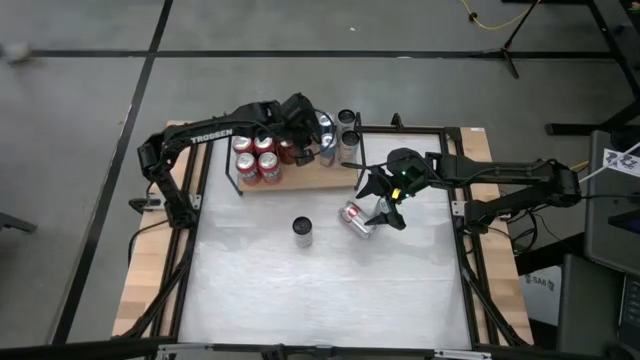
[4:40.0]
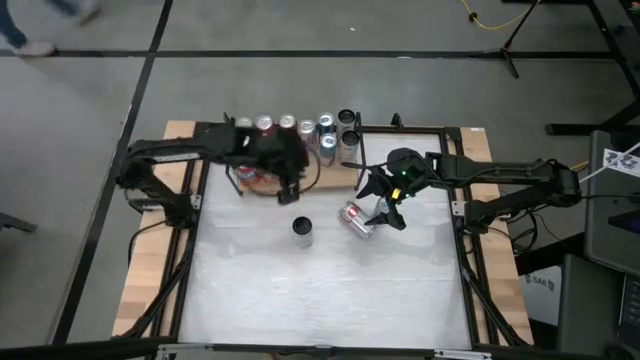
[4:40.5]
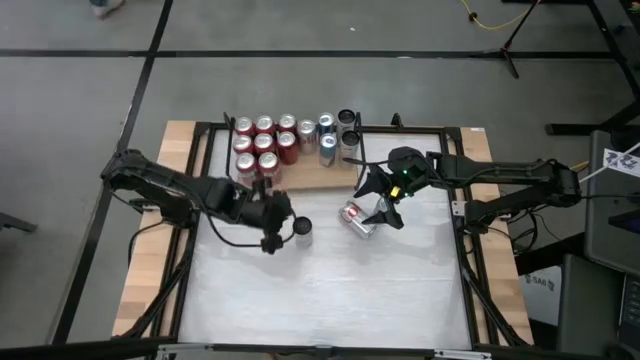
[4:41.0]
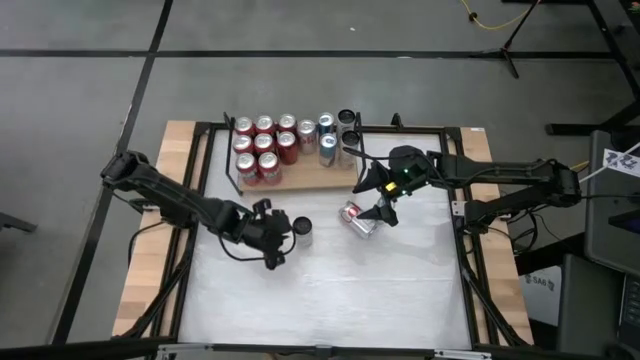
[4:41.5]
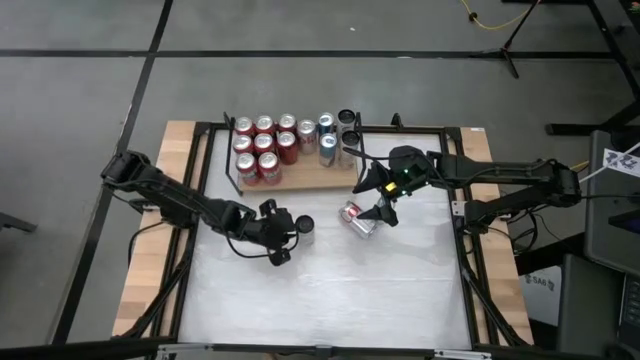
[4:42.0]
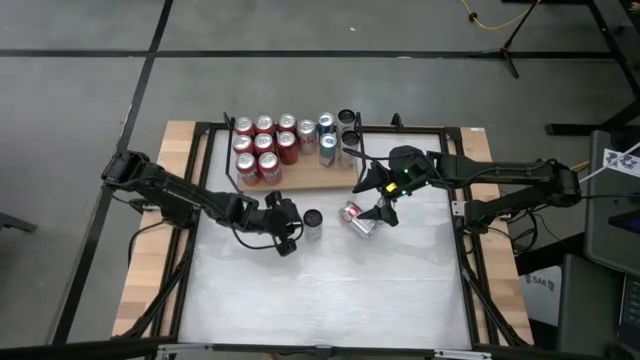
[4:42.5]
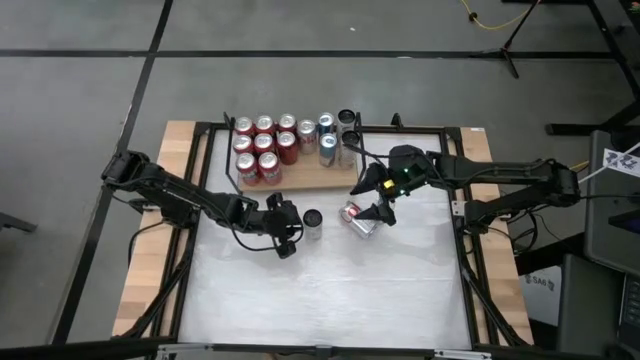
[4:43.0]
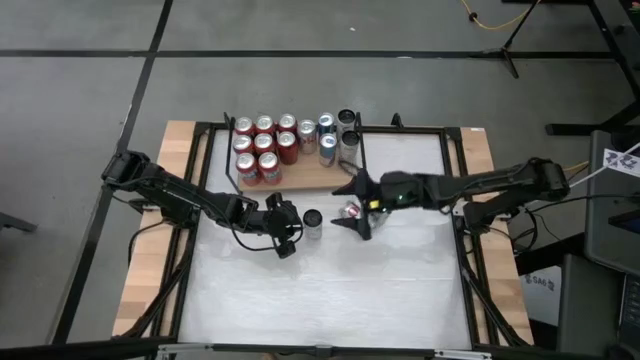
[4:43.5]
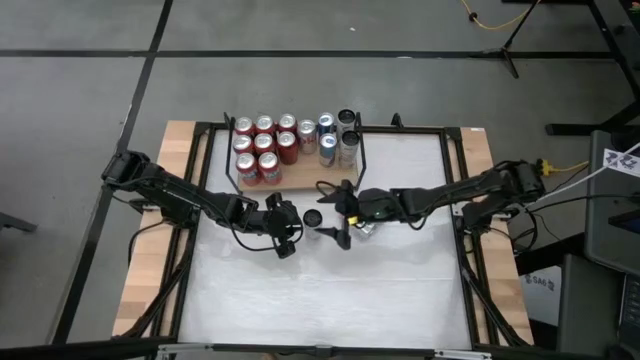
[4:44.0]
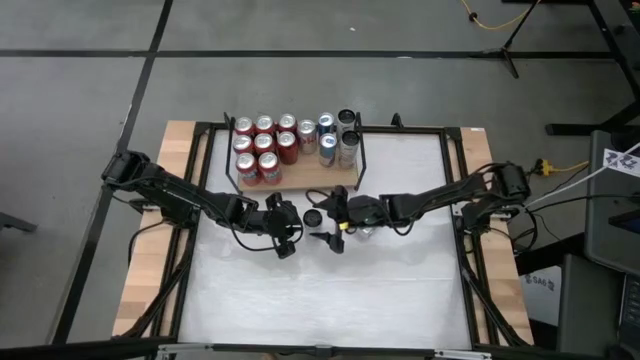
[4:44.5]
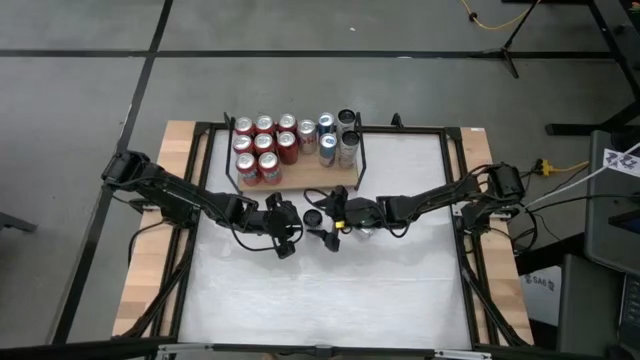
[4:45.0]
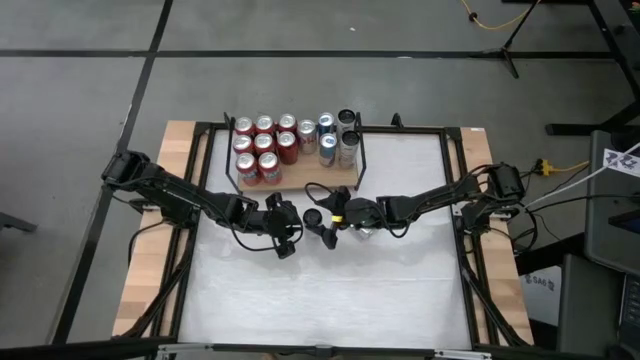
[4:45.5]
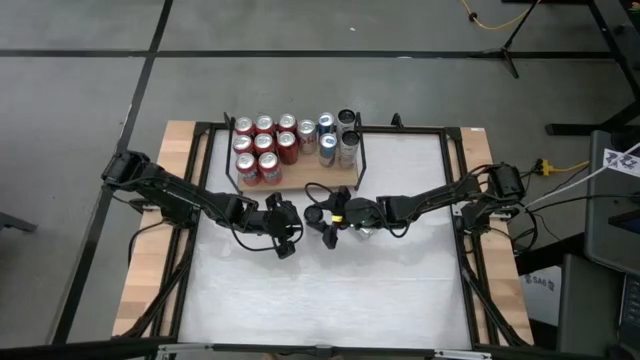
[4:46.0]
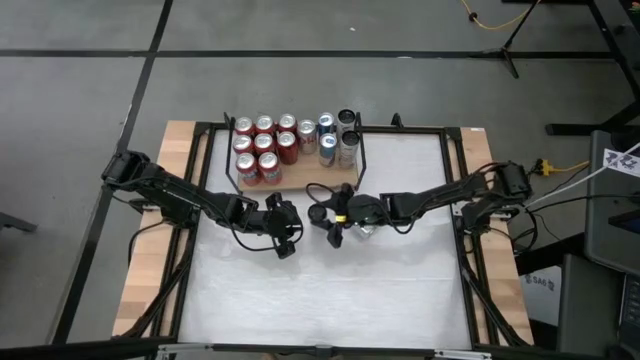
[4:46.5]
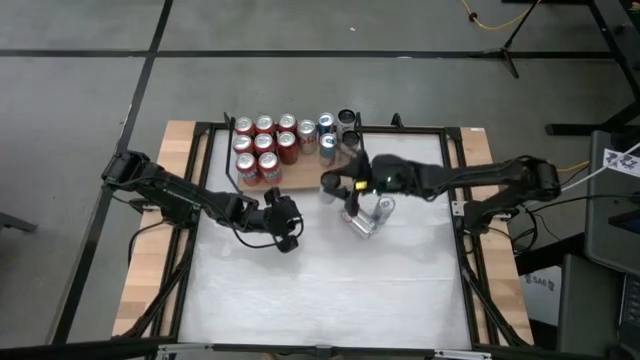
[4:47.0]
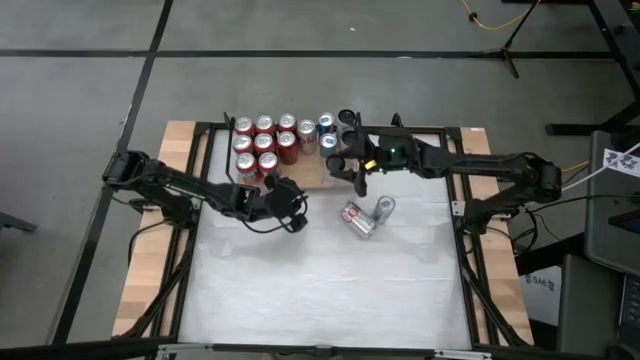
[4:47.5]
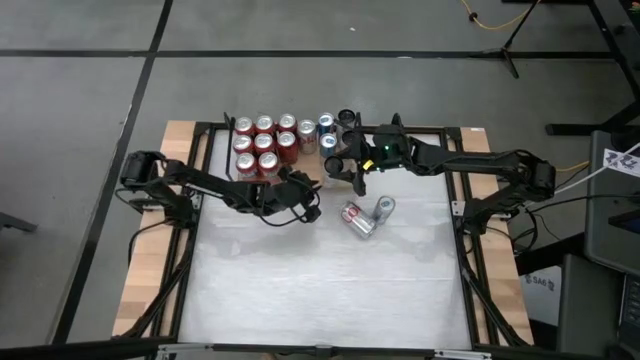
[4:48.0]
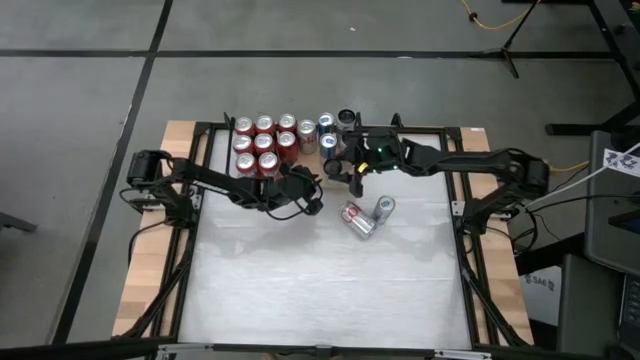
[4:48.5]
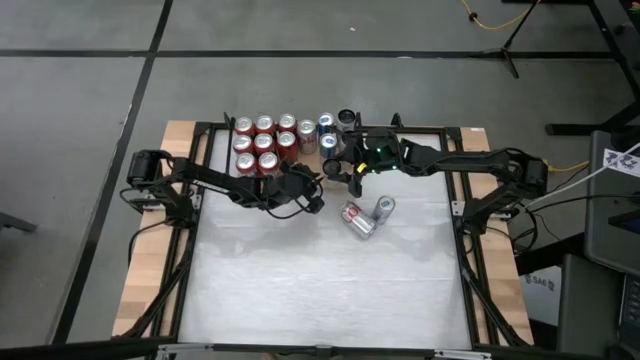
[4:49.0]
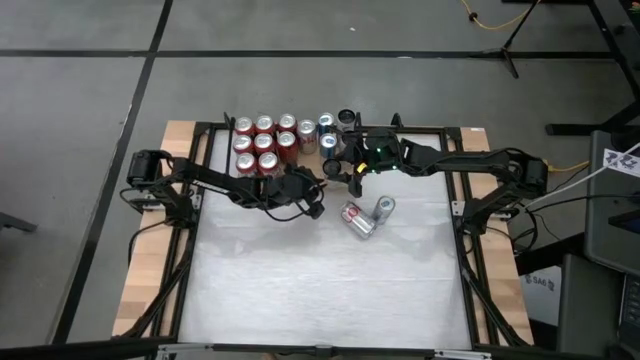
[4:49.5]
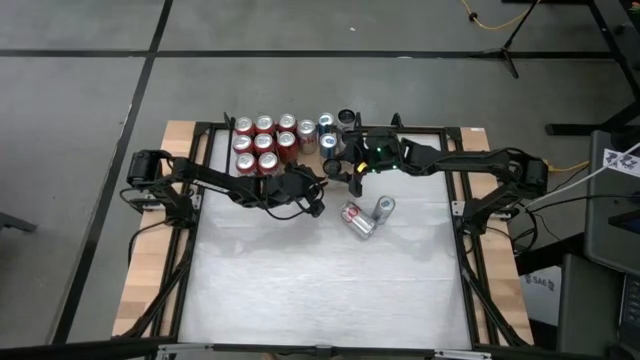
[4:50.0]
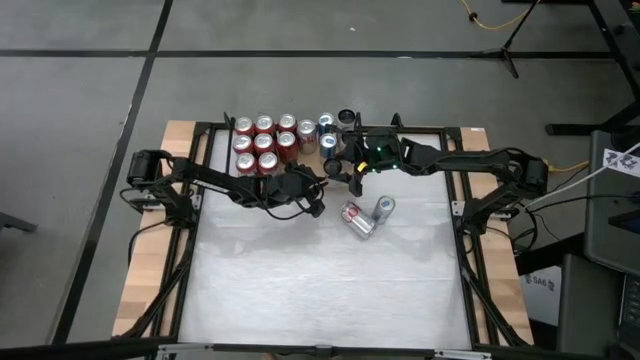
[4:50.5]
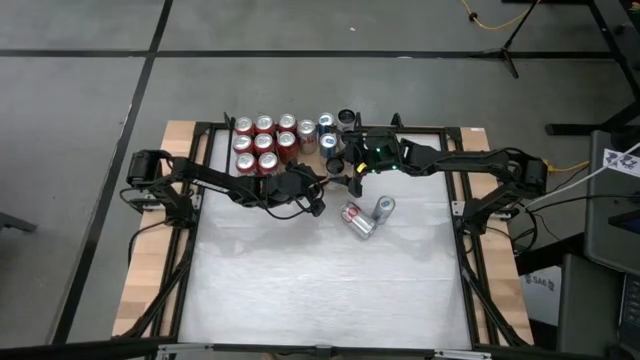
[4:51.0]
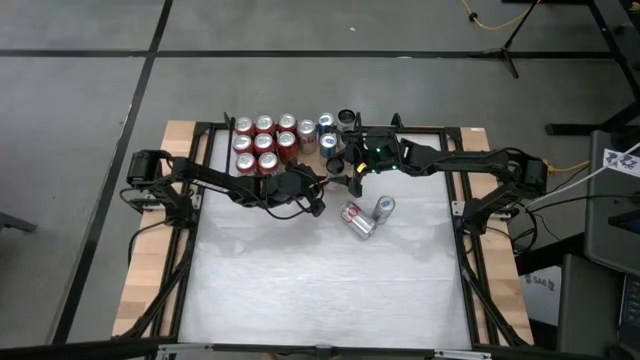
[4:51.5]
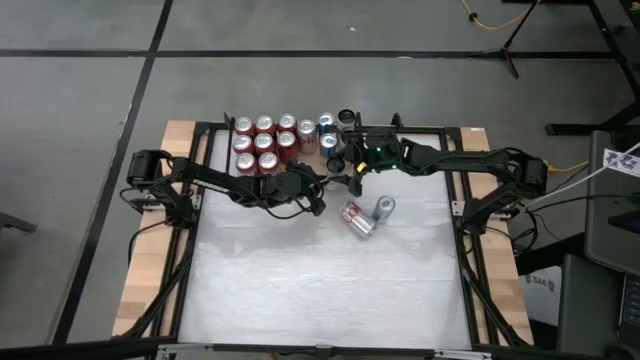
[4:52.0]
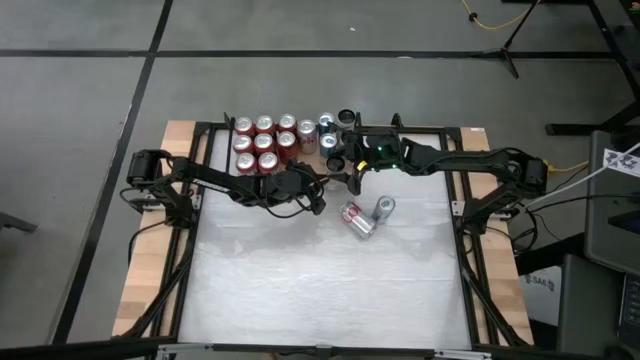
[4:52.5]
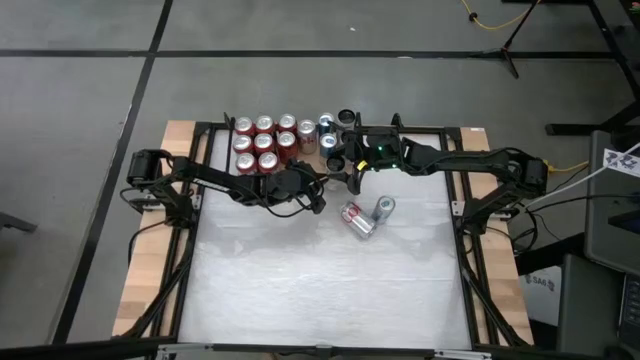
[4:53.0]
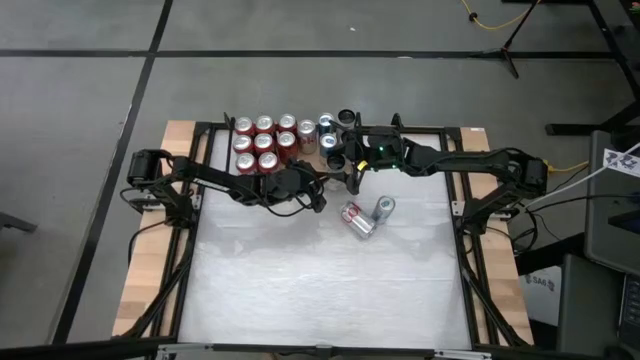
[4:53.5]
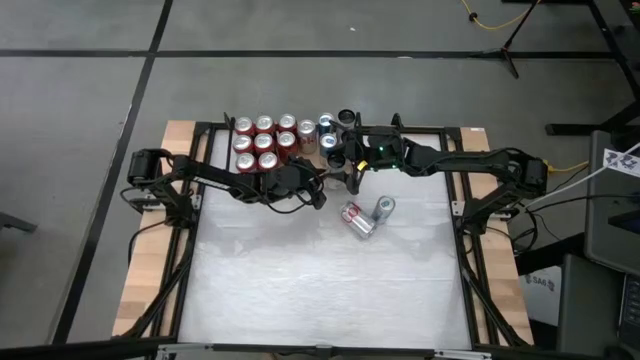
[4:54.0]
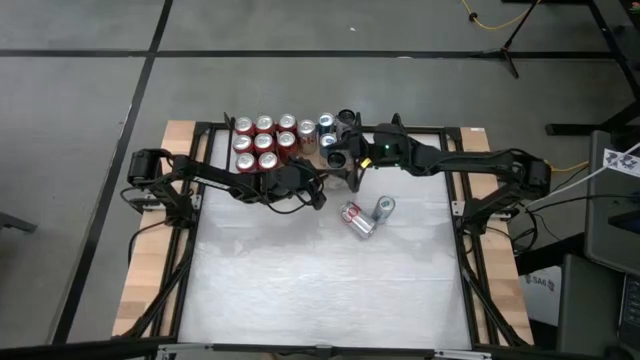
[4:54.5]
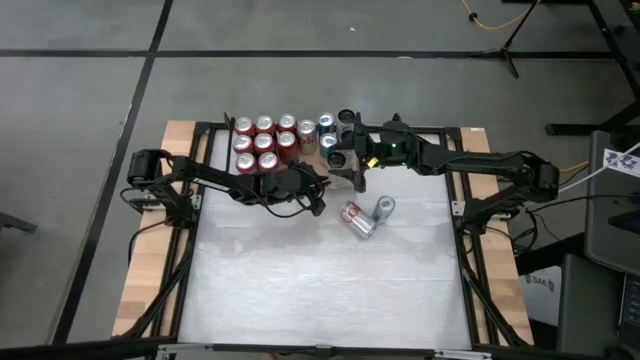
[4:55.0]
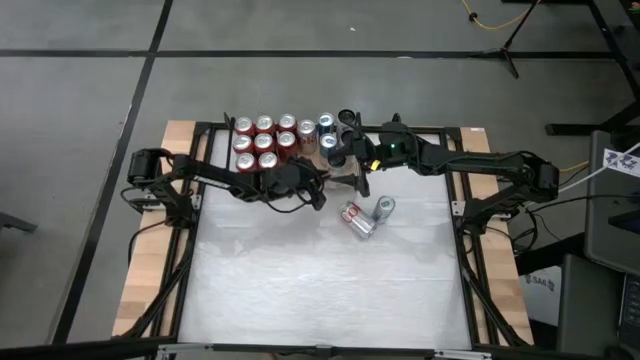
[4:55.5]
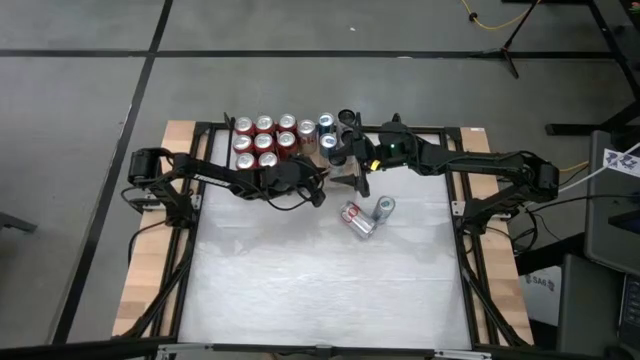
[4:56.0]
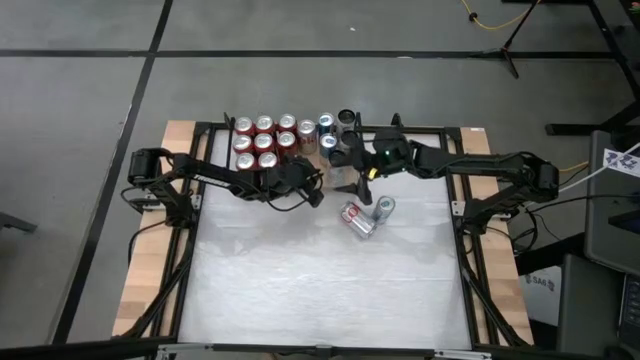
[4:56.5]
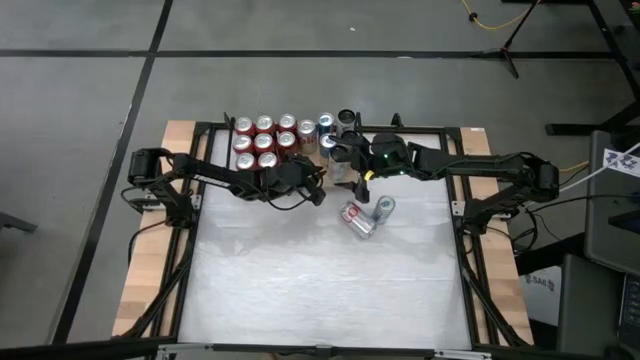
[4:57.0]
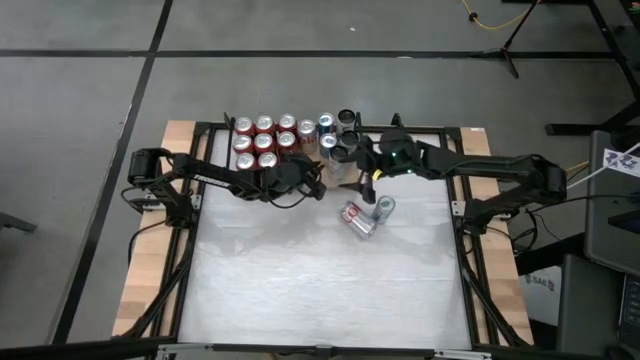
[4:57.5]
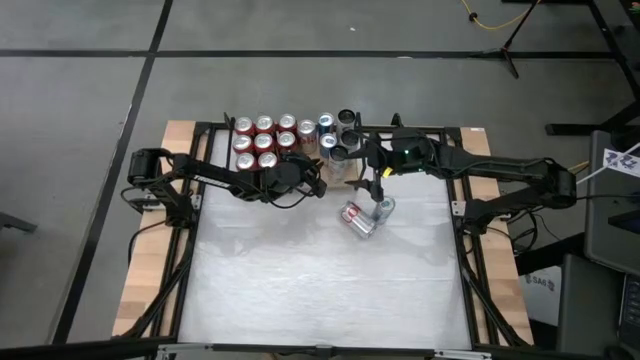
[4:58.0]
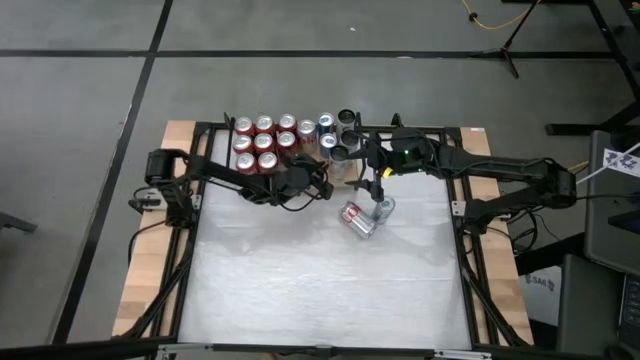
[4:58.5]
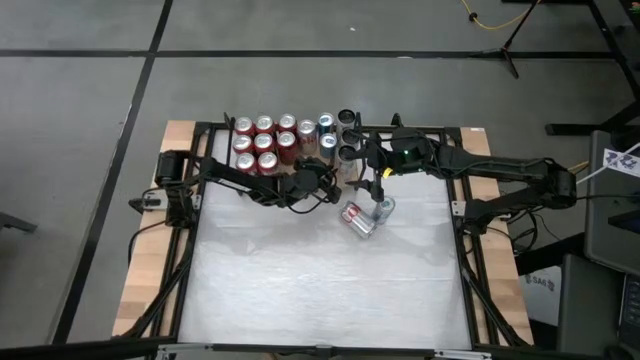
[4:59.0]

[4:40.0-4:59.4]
Task: Place canned beverage on shelf
Put the white pink soda can on the shelf aligned with the other white pink soda cans

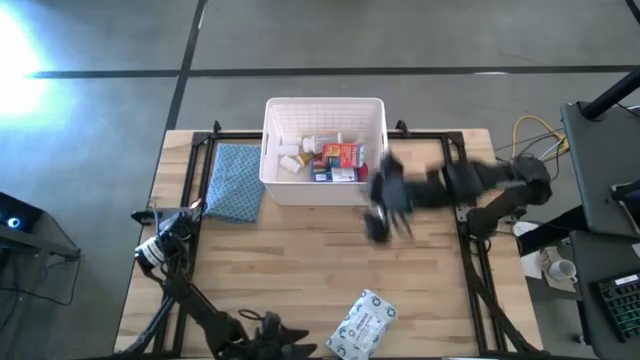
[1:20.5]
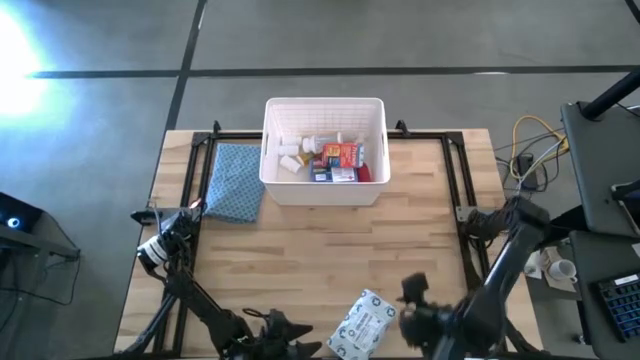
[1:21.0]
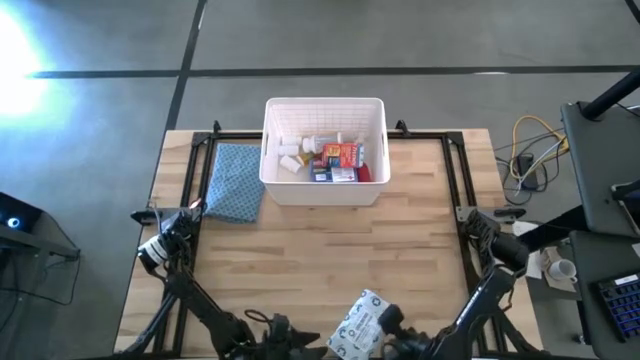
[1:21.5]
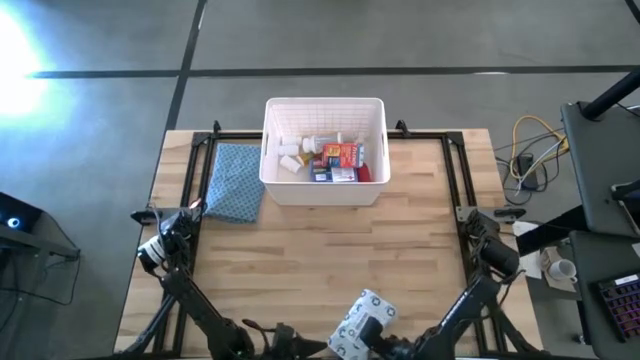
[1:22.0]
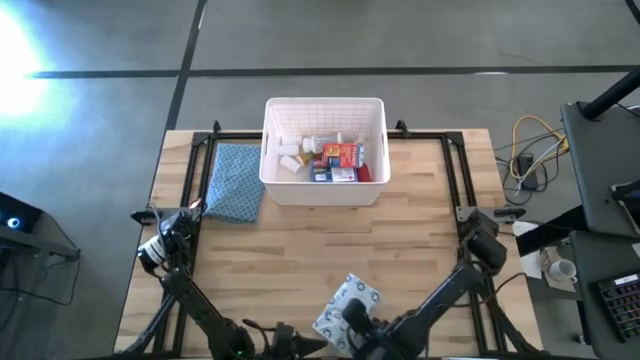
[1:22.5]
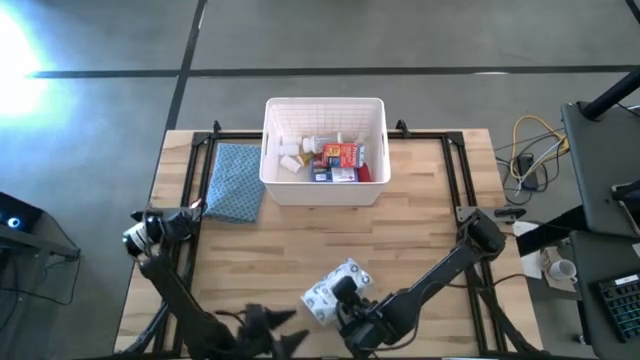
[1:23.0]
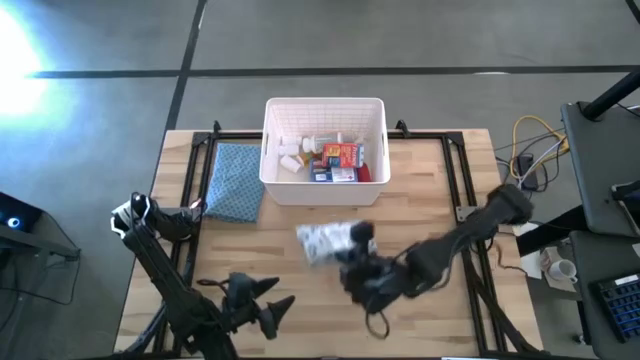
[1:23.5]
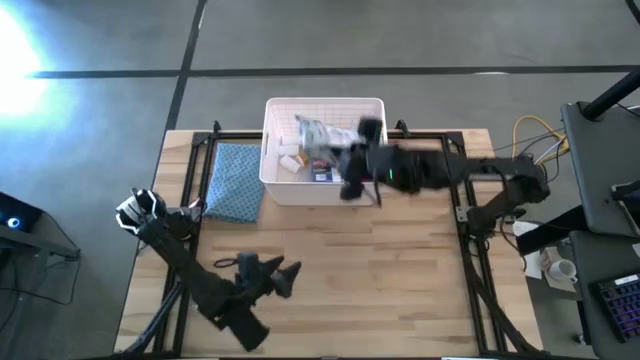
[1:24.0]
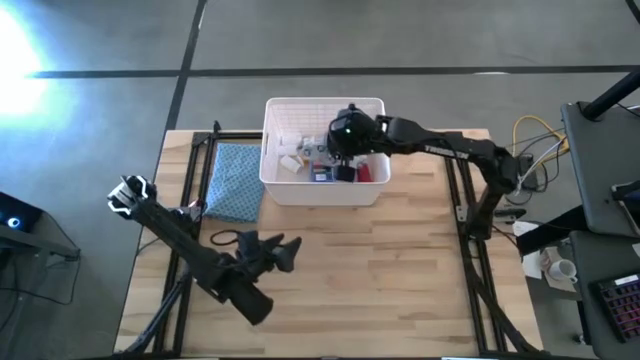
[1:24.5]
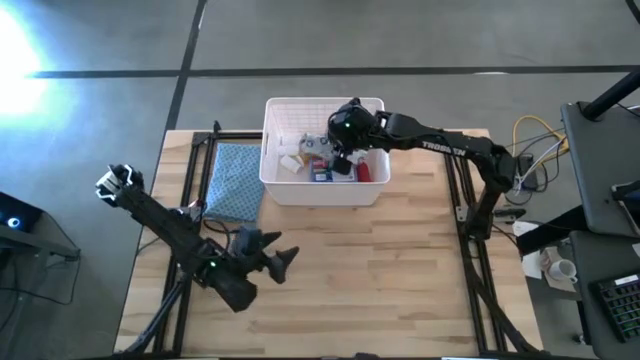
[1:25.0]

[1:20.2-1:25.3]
Task: Pick & place medical supplies in basket/bin
Put the mailer bag into the white bin
